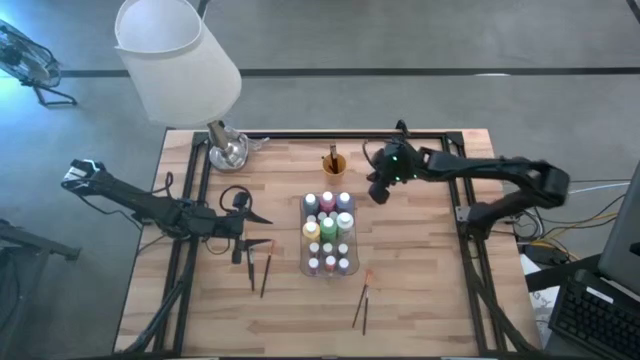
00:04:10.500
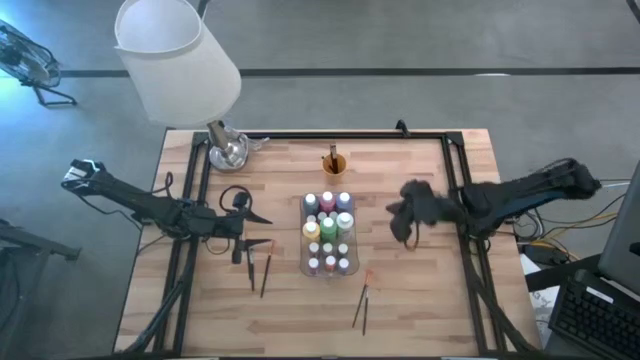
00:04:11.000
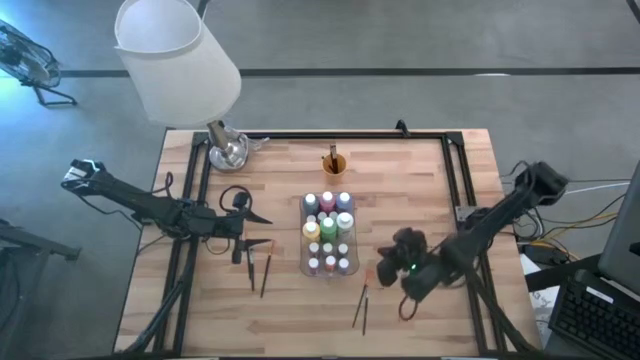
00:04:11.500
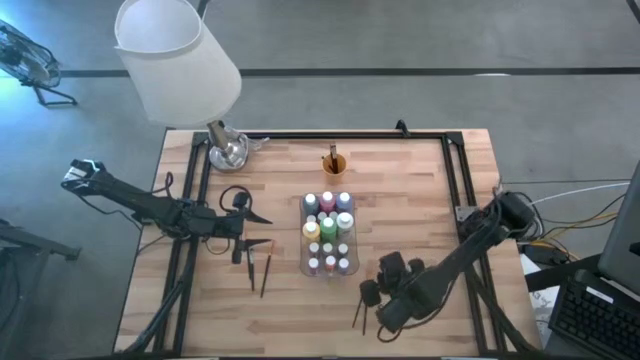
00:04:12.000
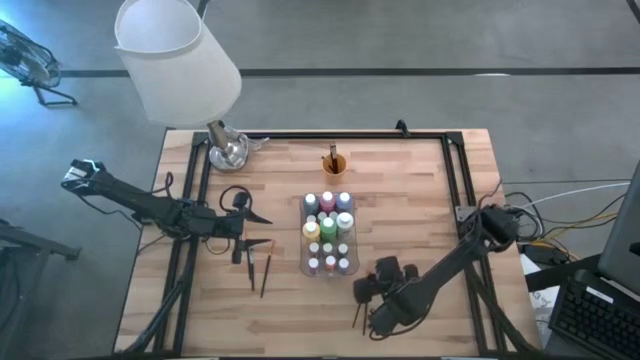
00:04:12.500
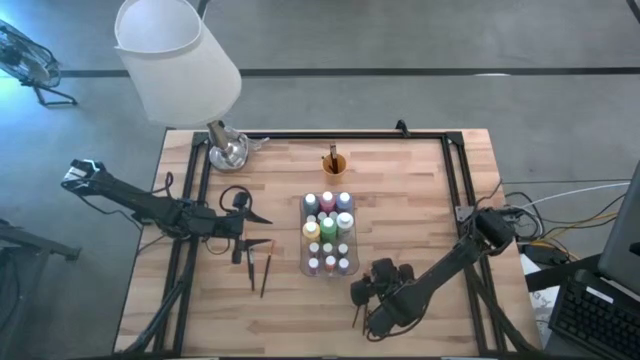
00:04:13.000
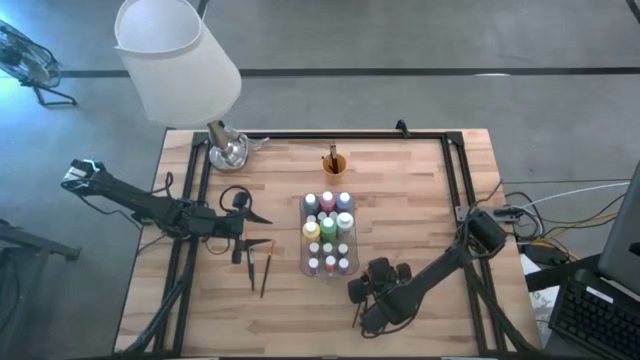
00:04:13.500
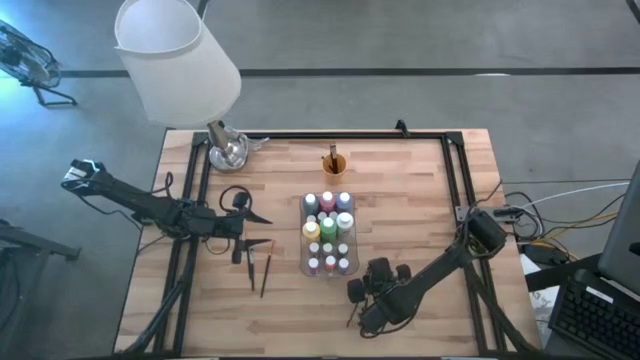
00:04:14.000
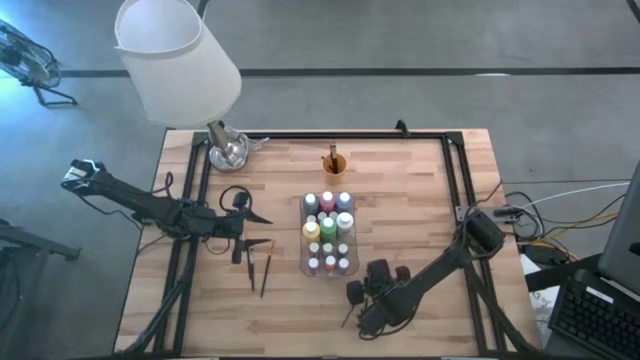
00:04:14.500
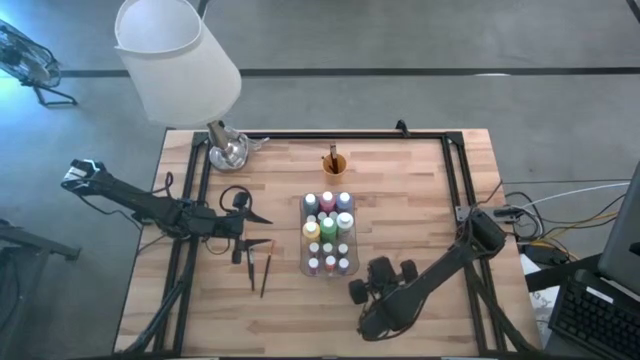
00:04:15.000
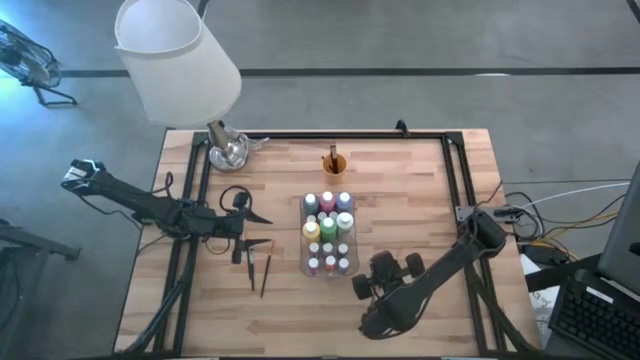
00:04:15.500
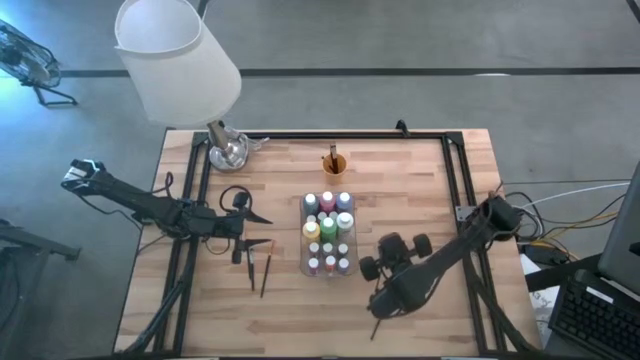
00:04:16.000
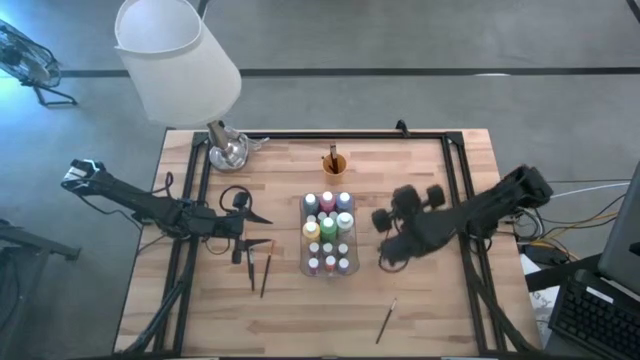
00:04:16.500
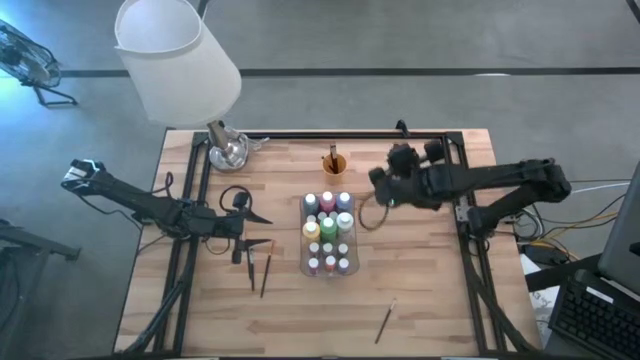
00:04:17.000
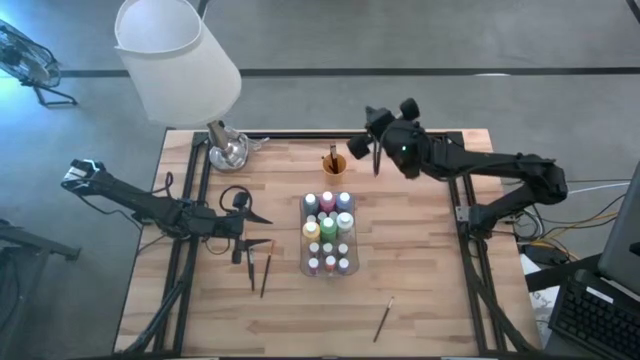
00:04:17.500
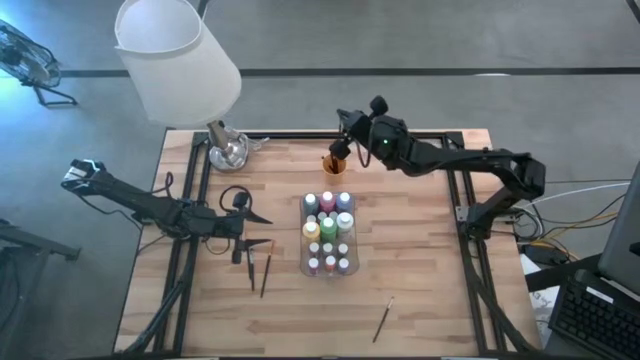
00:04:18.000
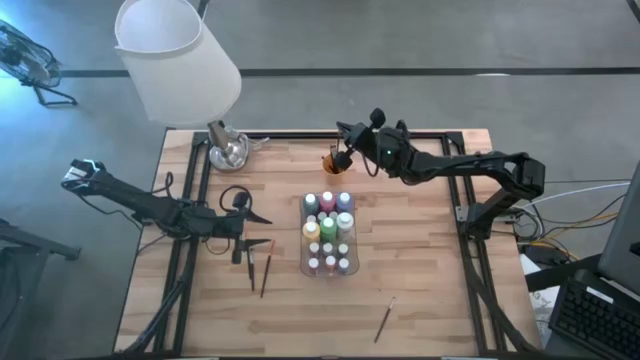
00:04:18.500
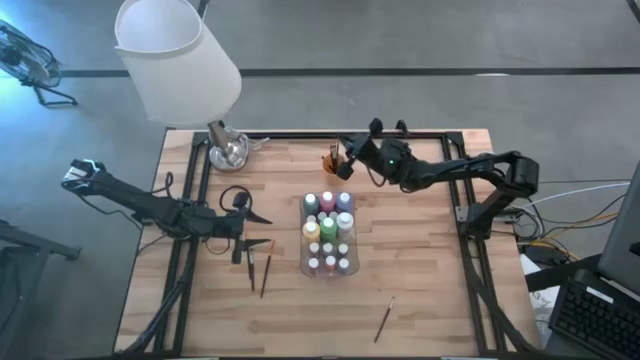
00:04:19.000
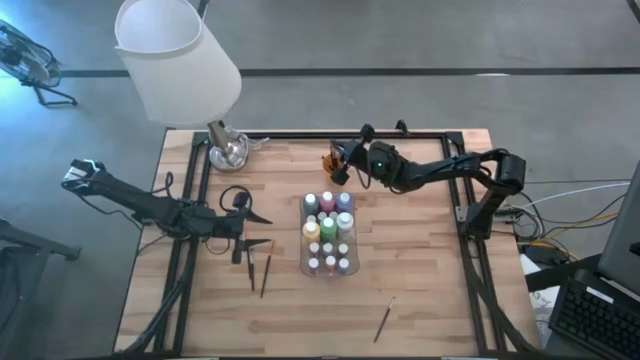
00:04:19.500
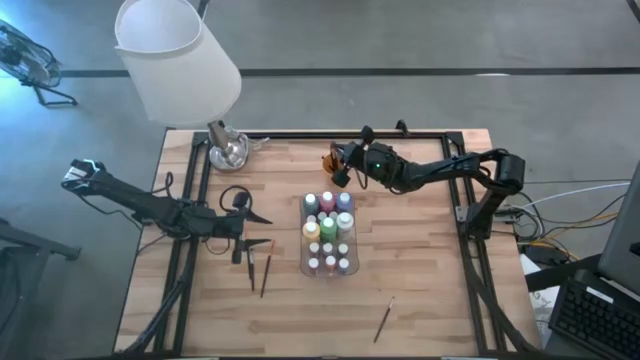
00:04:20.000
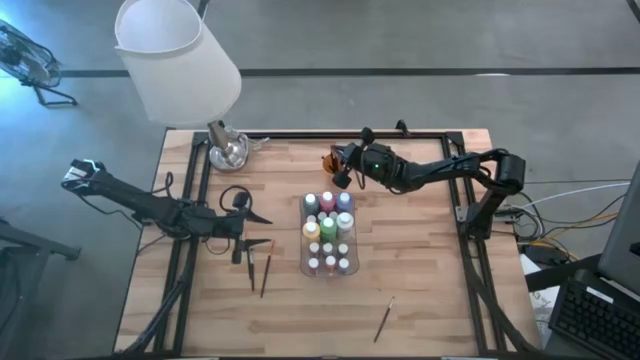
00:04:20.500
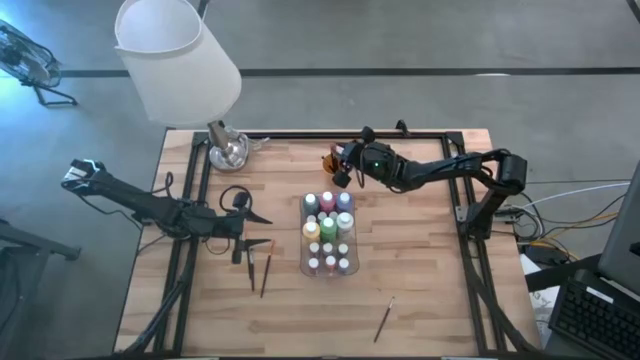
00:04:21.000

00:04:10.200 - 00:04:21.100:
Task: Pick & Place Paint Supplies
Put the orange paintbrush into the yellow cup

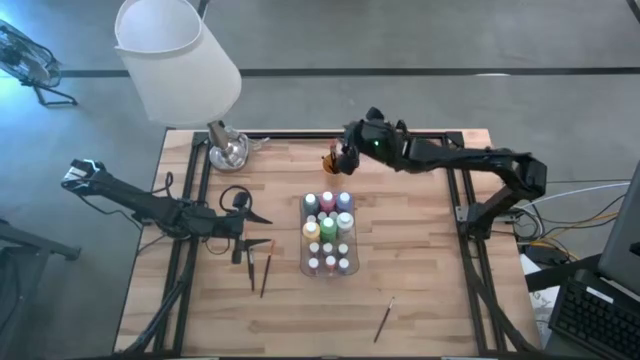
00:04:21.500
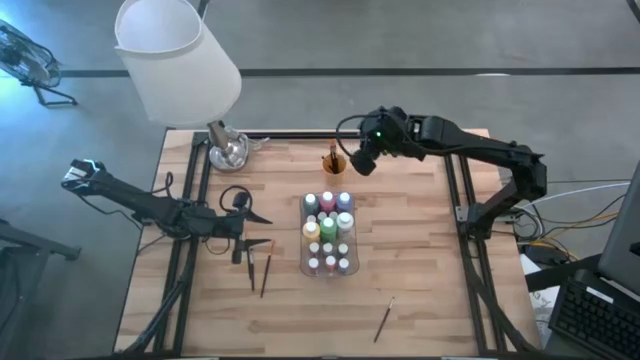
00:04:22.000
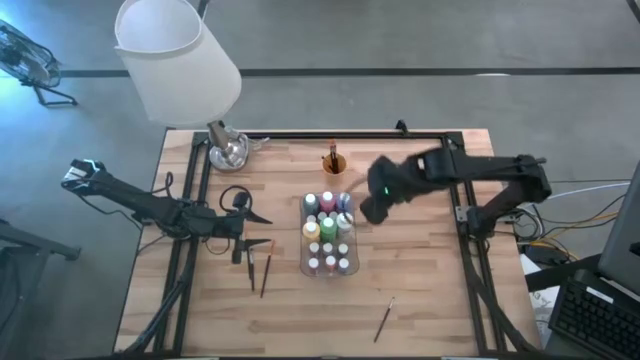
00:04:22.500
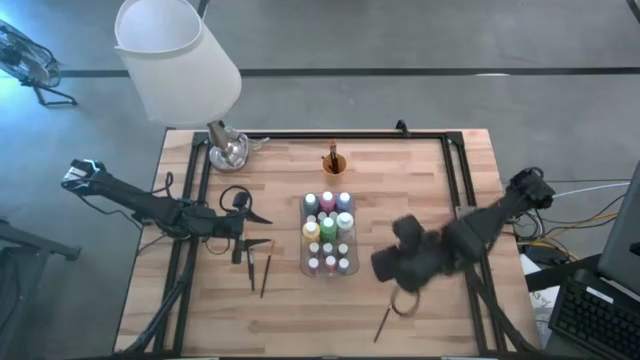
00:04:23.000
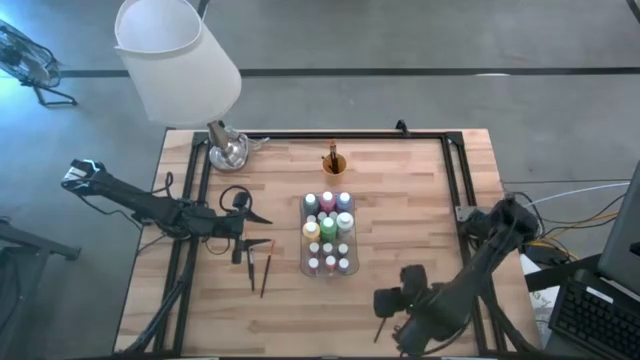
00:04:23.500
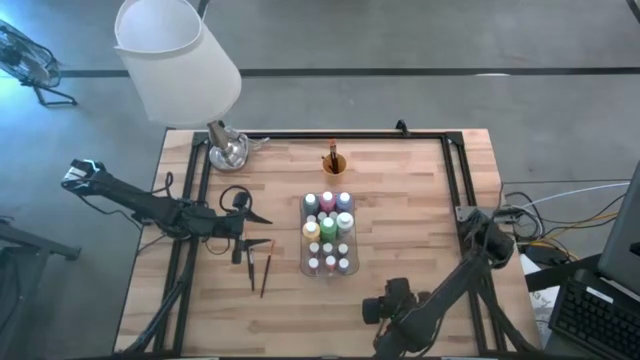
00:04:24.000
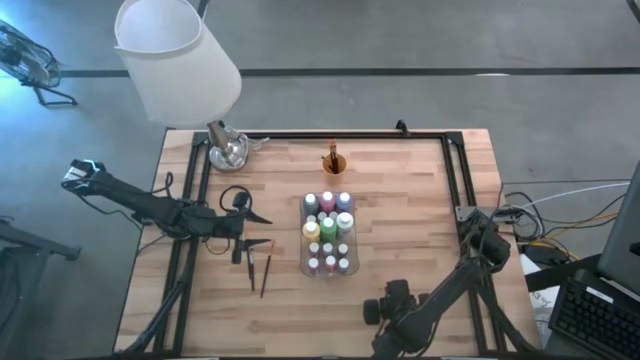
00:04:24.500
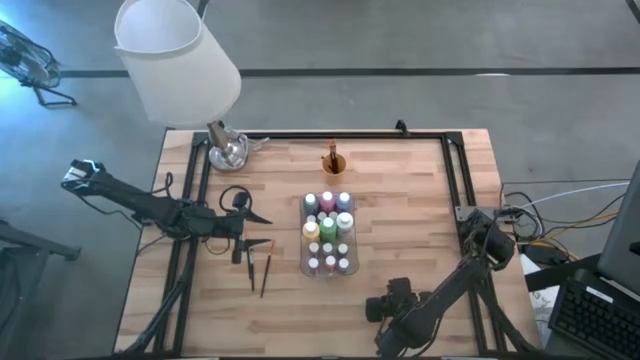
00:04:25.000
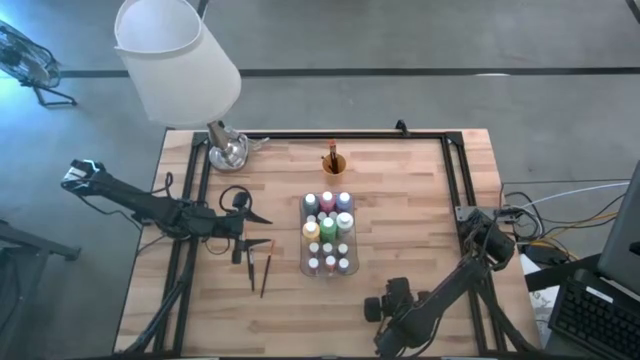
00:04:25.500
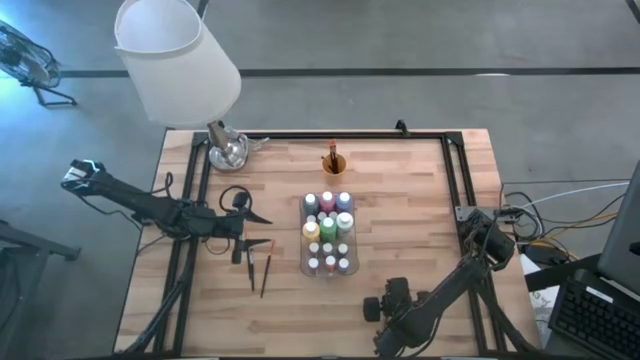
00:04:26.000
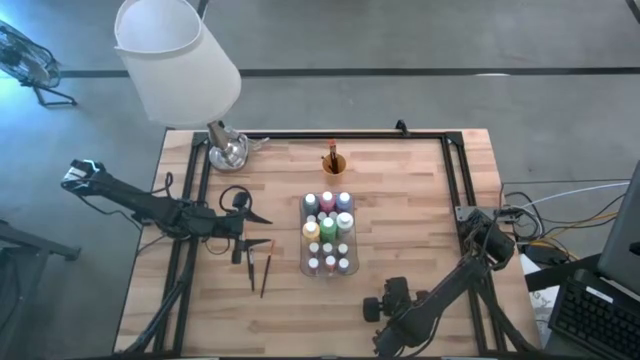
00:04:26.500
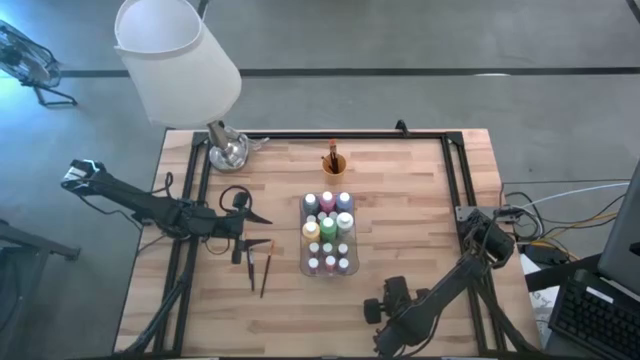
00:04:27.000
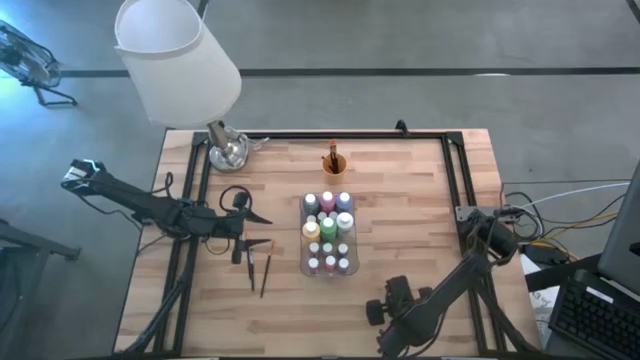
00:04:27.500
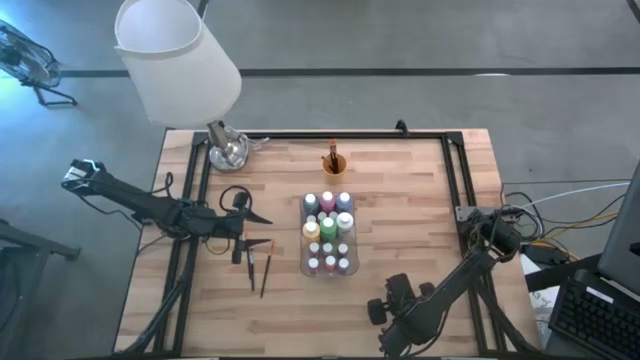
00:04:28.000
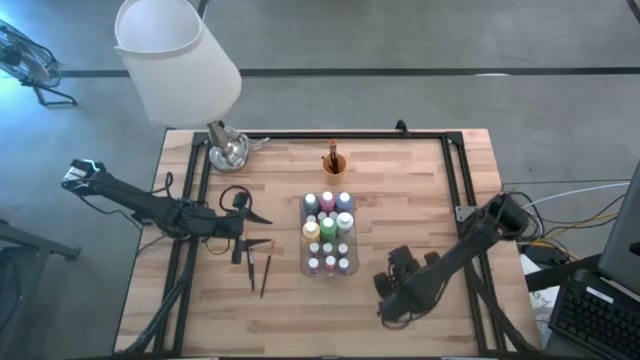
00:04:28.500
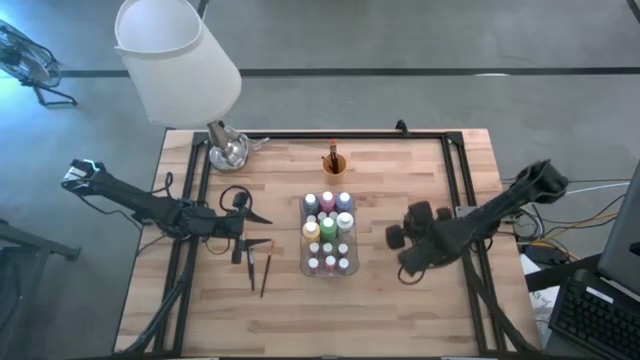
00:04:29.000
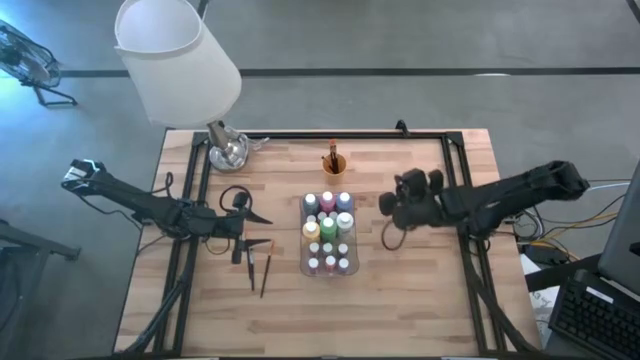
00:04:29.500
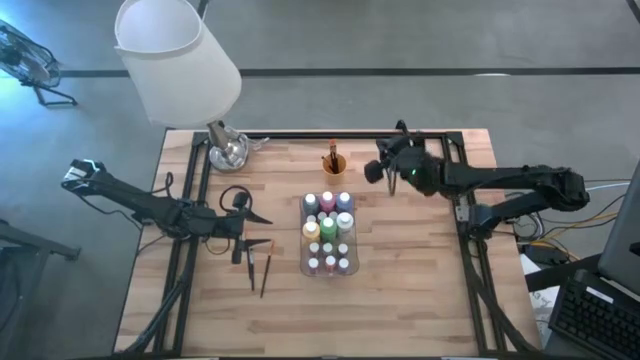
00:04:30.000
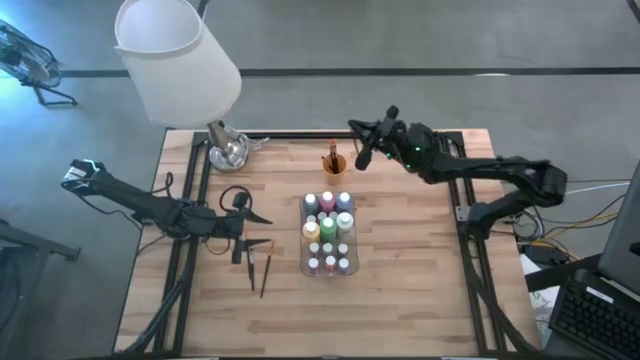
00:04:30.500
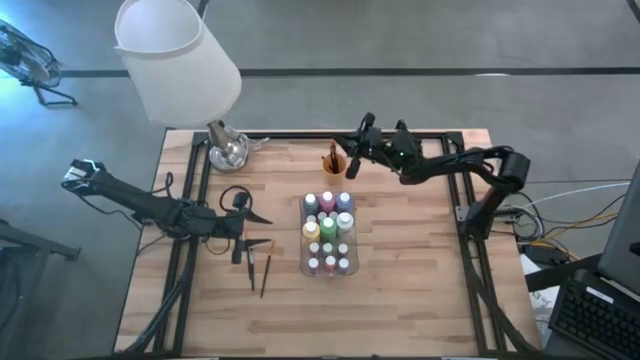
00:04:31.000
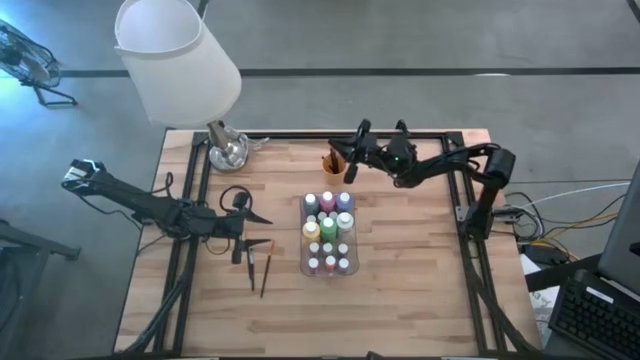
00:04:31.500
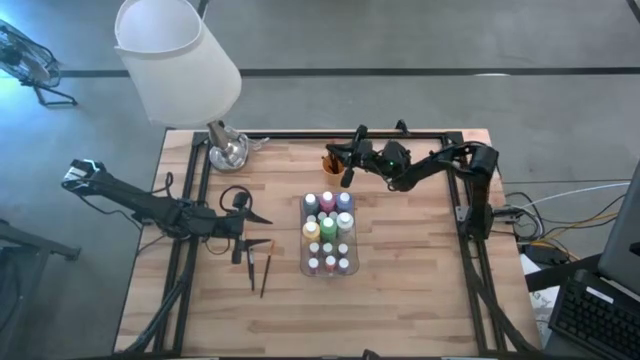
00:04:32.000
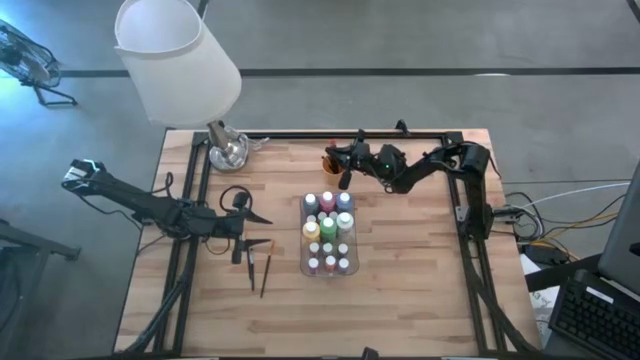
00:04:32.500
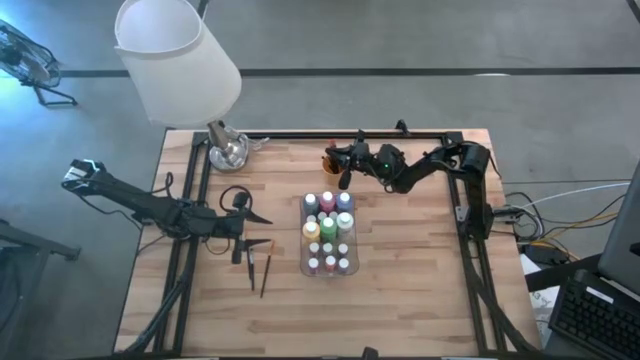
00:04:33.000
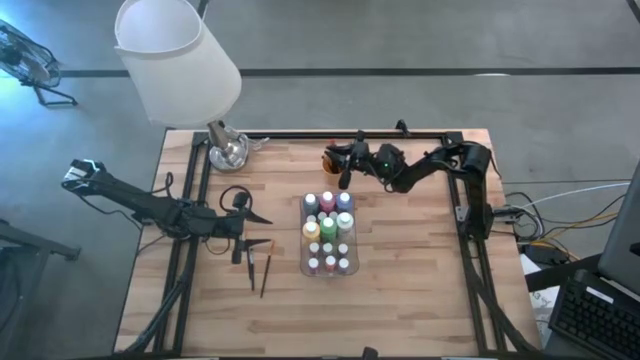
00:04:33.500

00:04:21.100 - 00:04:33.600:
Put the gray paintbrush into the yellow cup
